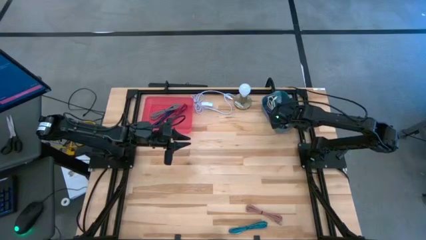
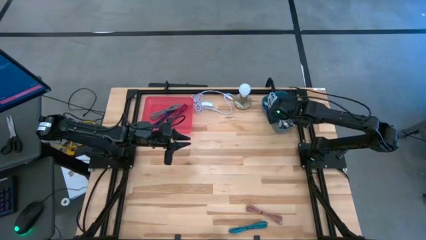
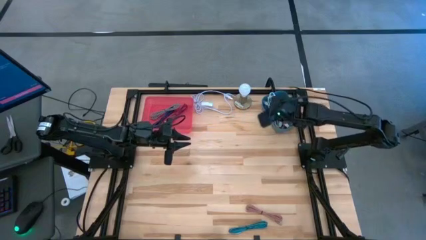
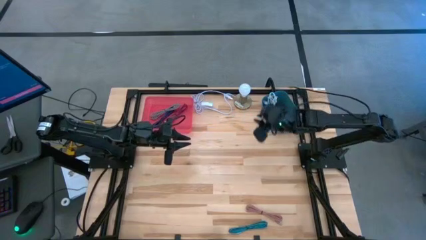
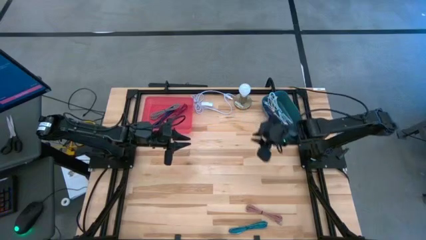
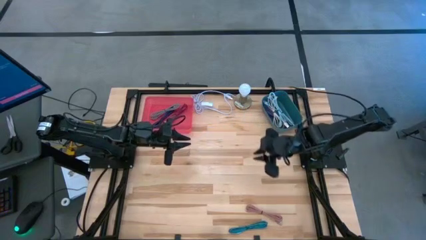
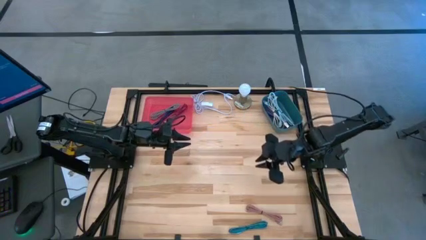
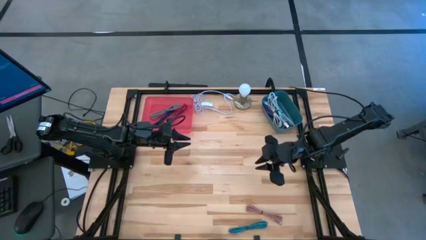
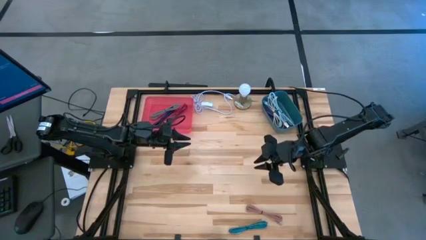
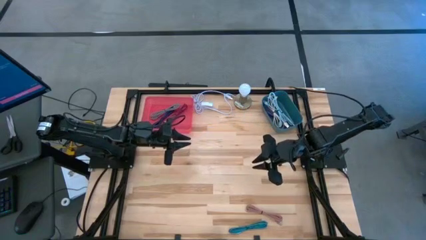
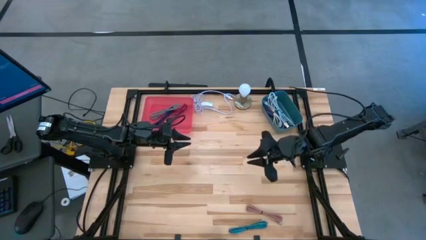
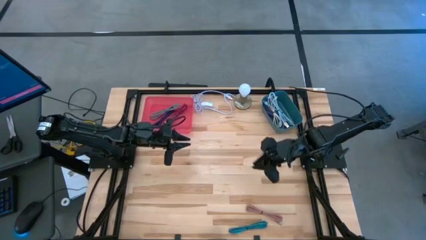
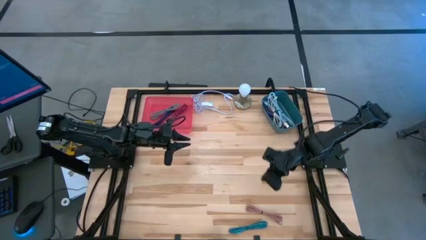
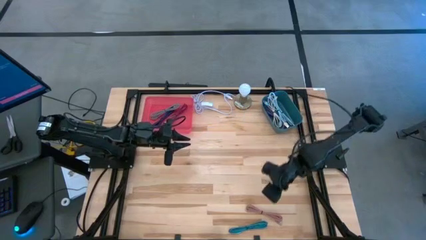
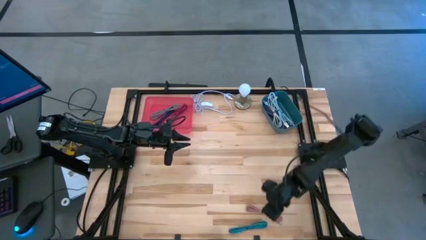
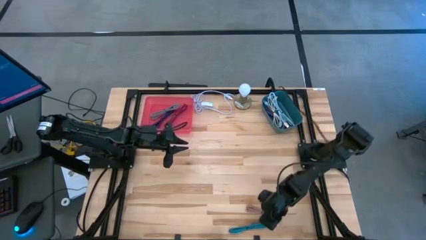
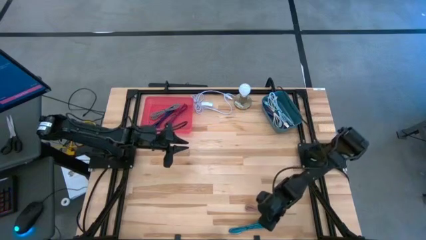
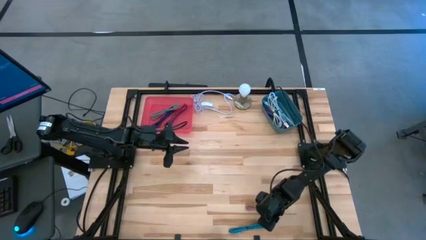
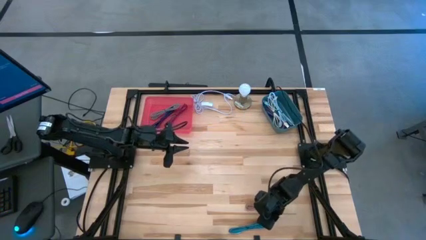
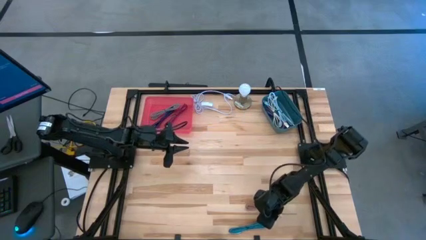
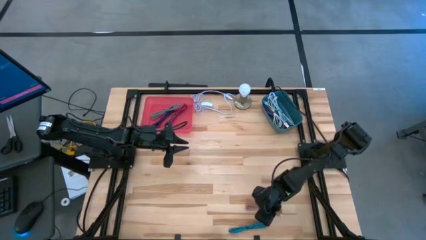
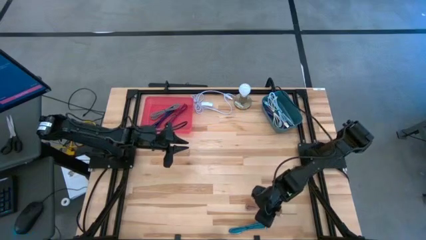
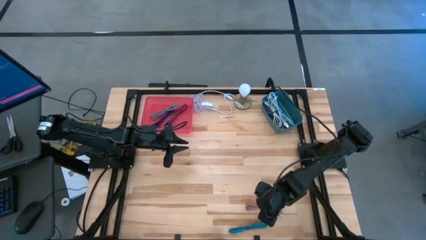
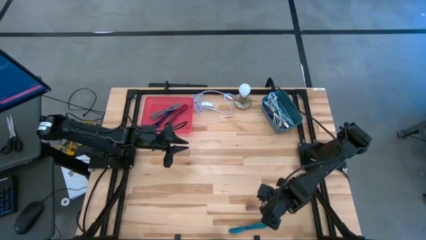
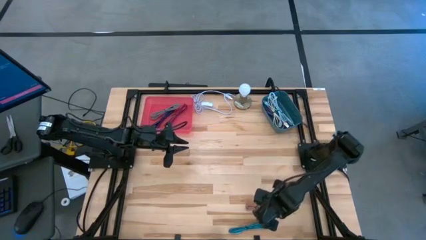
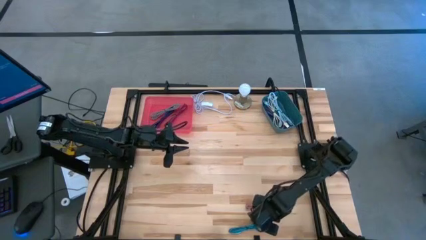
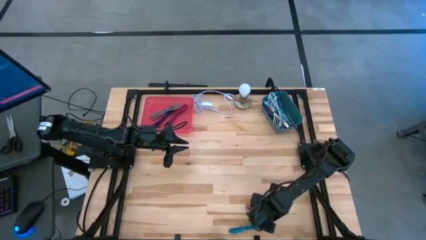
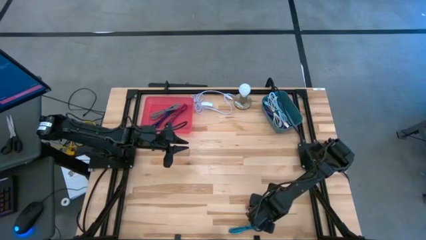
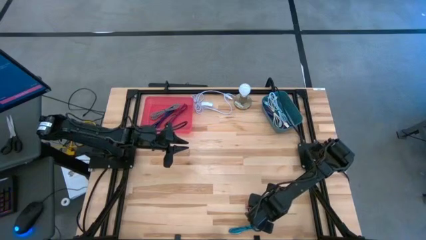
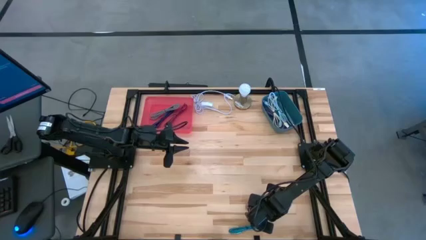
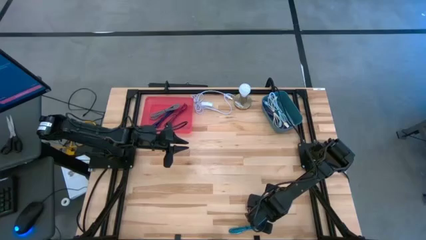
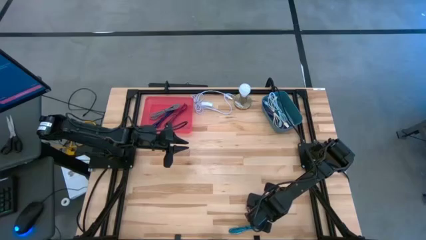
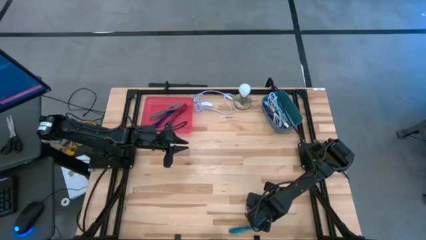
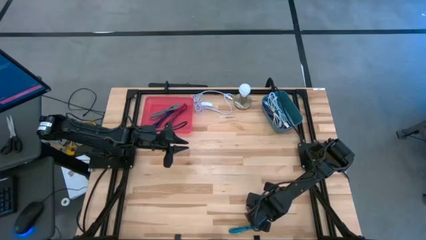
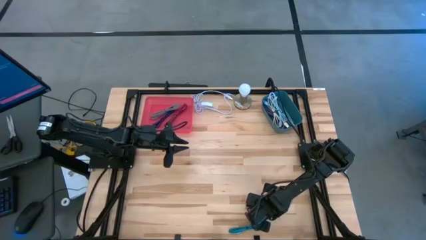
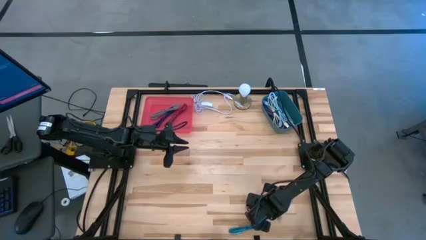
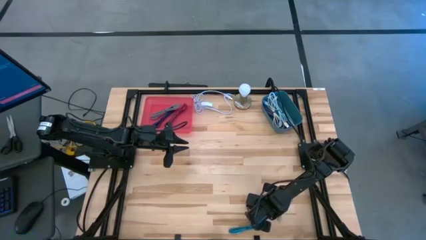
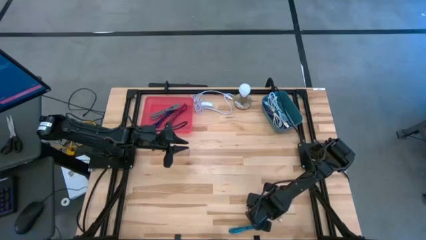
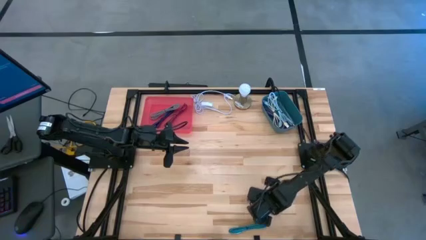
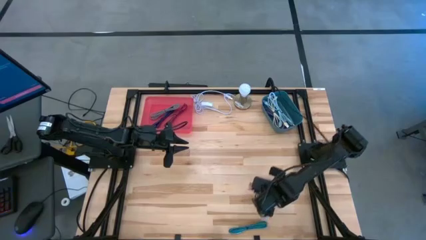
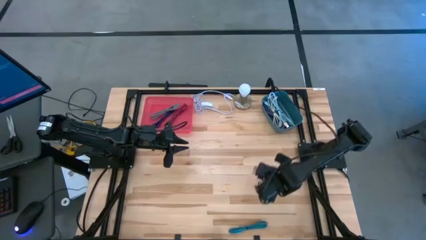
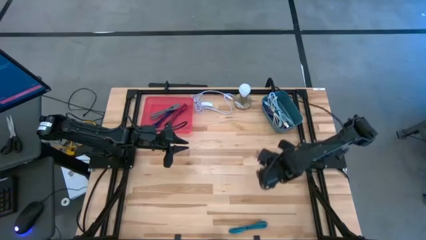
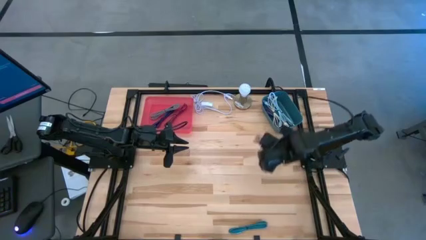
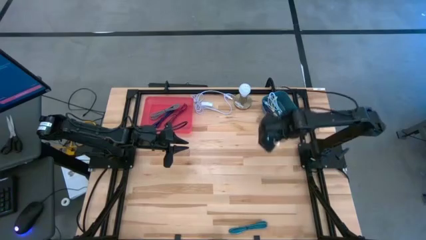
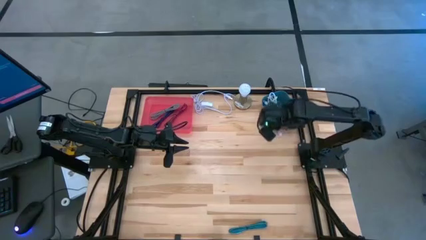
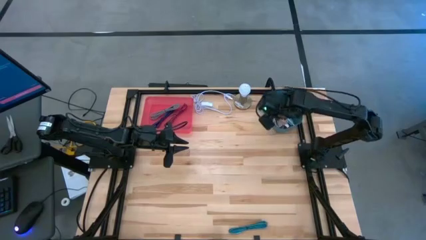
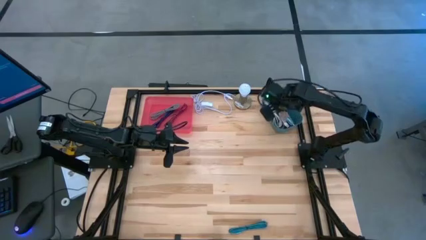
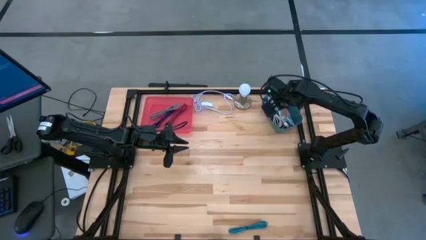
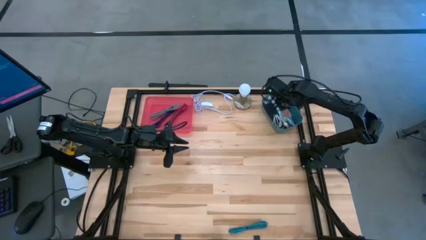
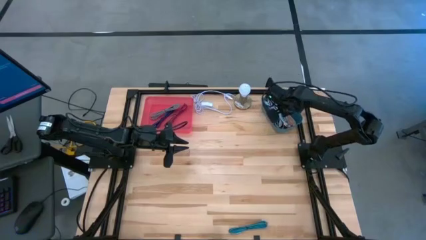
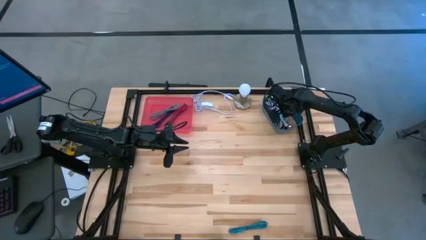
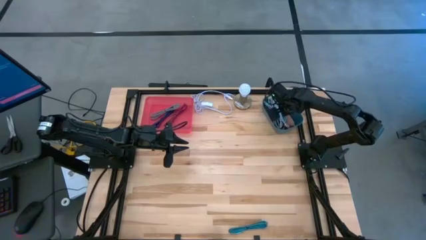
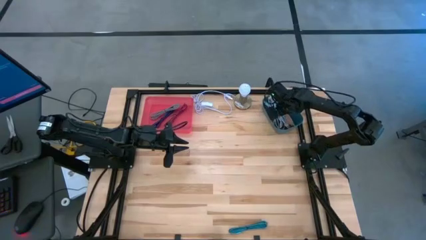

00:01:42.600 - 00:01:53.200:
Task: Pick & Place USB Port
Put the light pink charger cable into the blue bin

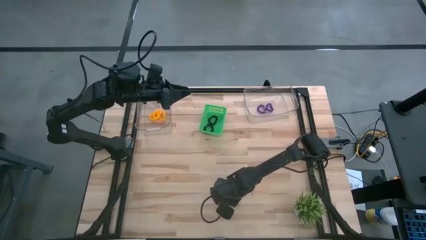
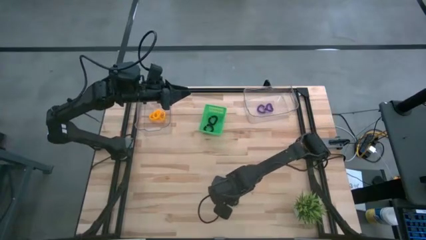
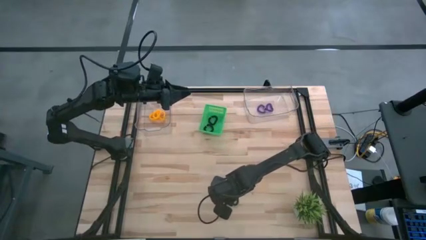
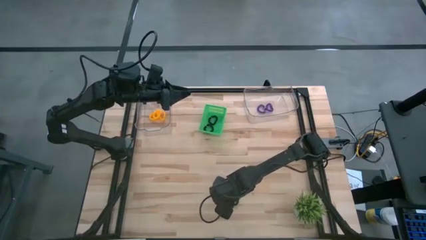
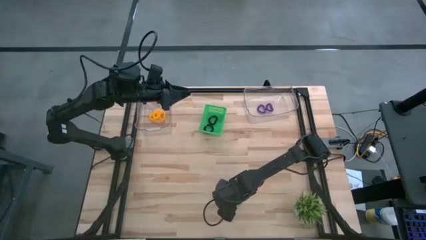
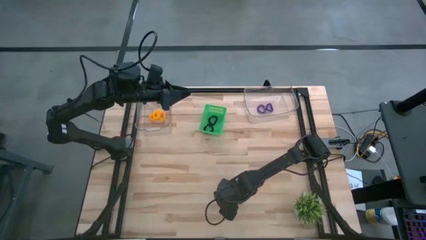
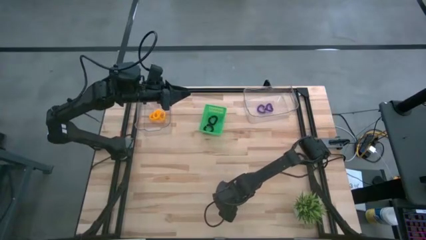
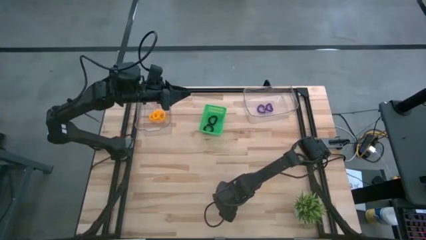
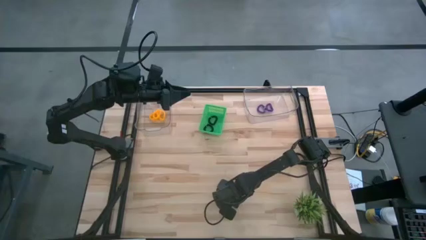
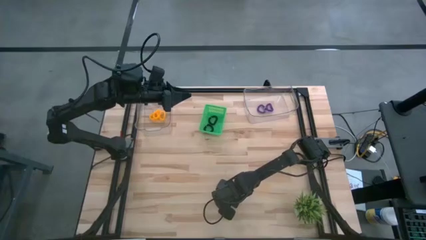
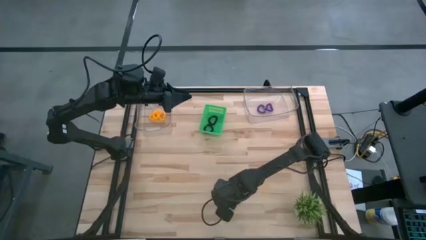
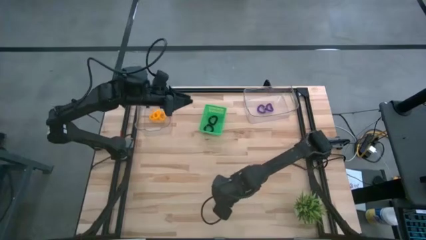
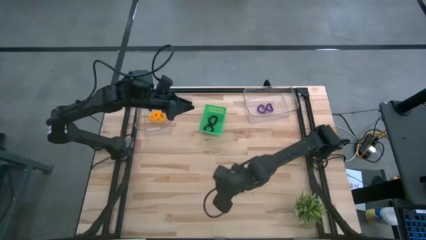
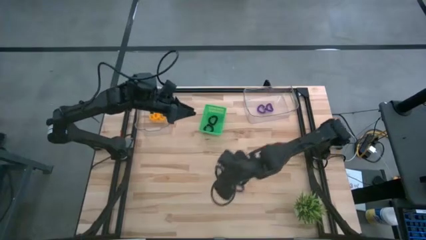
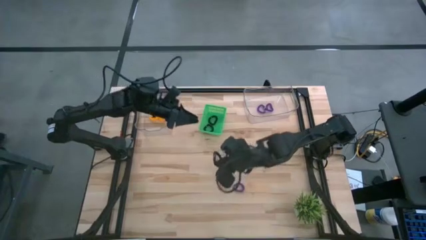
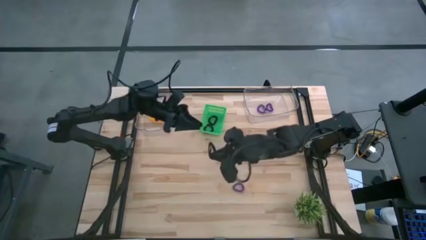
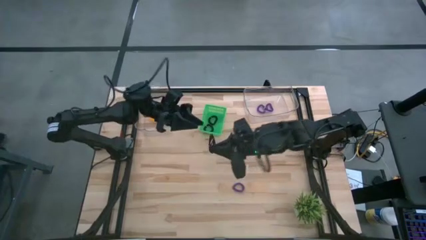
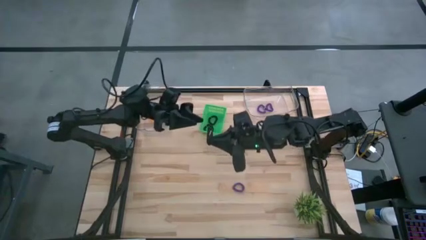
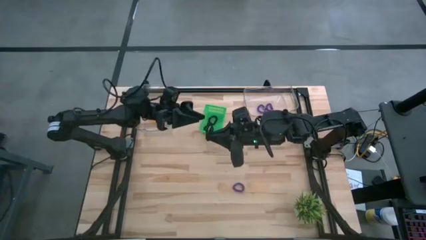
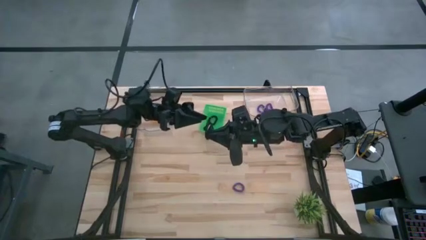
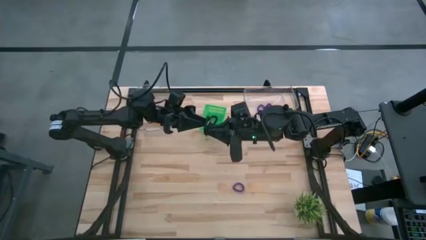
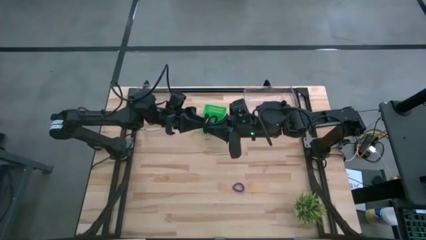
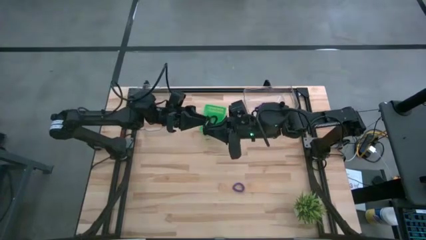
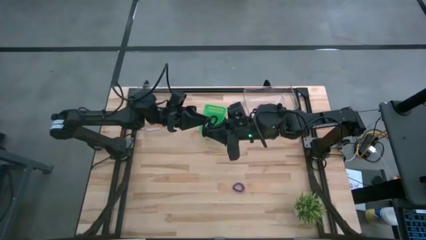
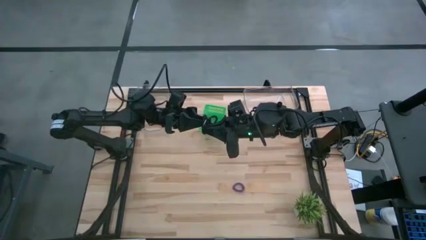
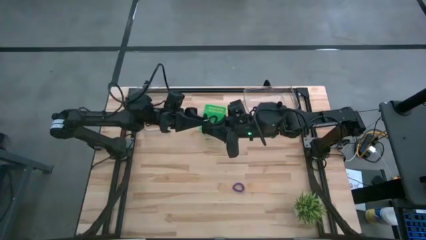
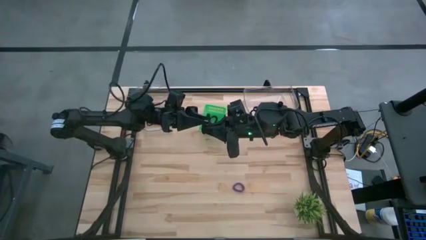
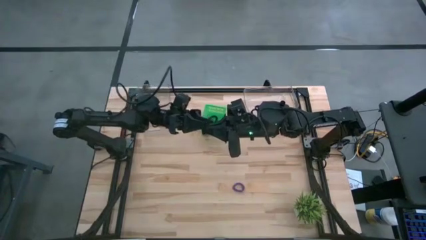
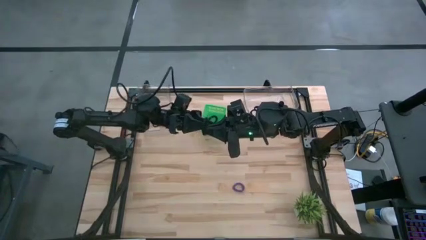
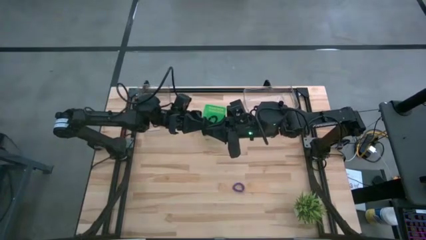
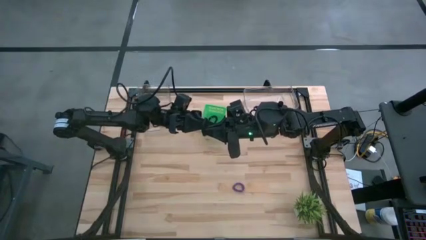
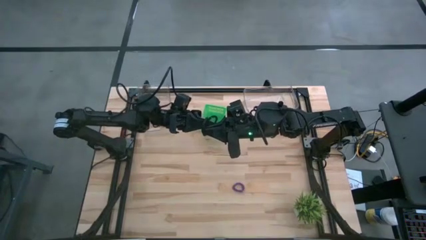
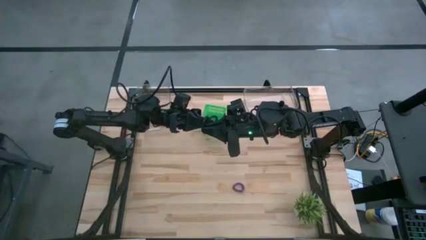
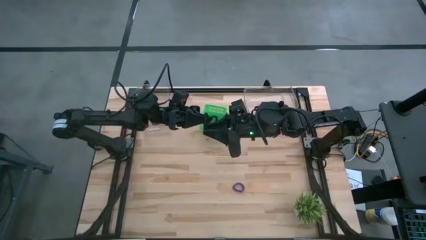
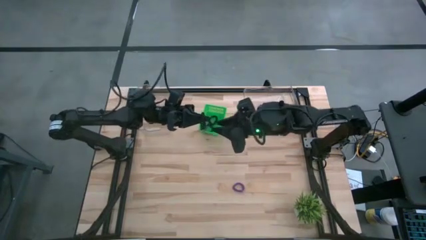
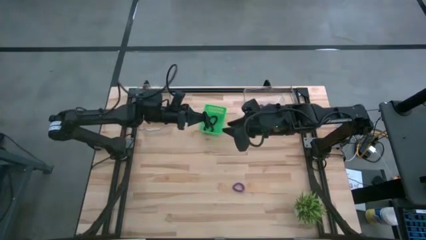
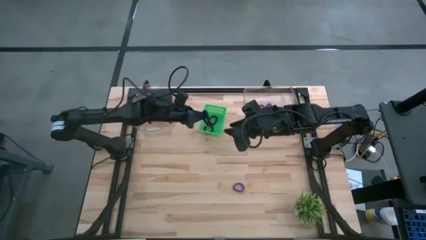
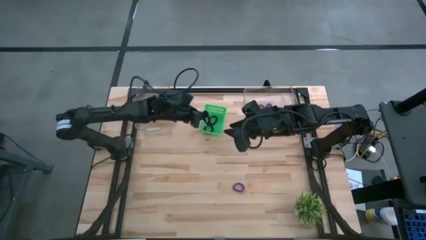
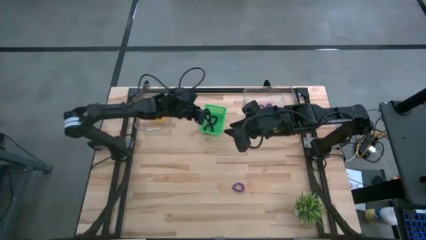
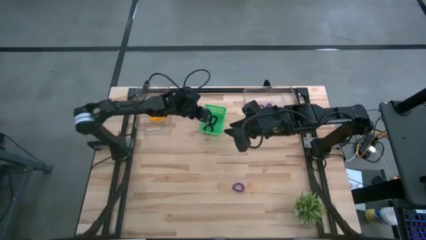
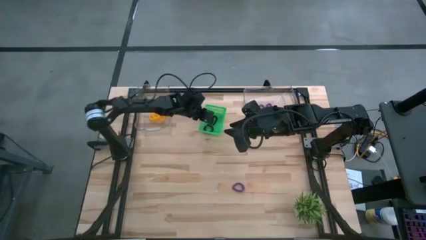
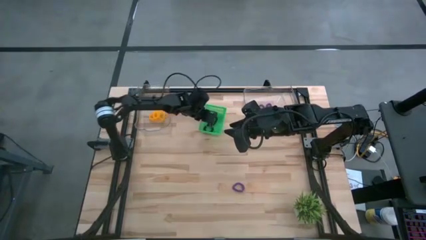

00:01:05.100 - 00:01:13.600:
Task: Sort spring keychains
Put the black spring keychain into the green bin
